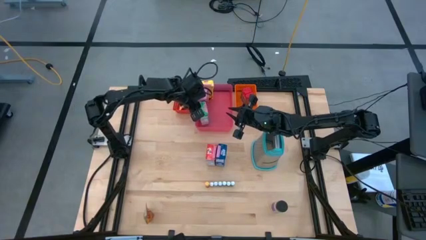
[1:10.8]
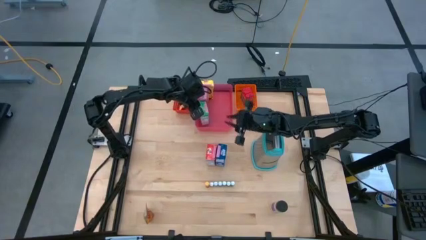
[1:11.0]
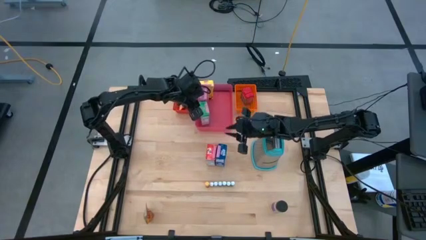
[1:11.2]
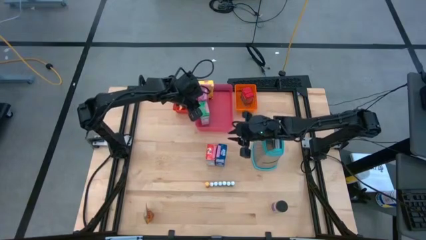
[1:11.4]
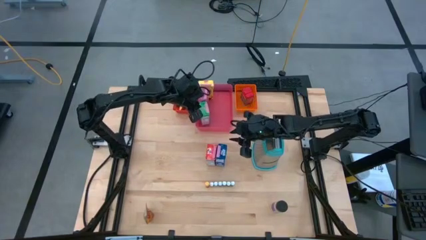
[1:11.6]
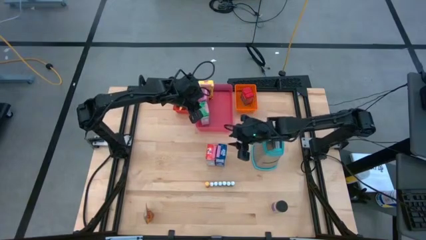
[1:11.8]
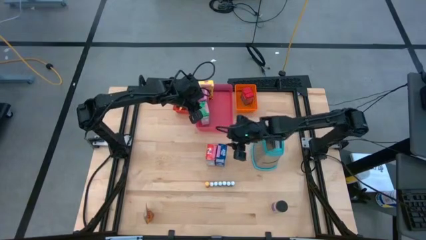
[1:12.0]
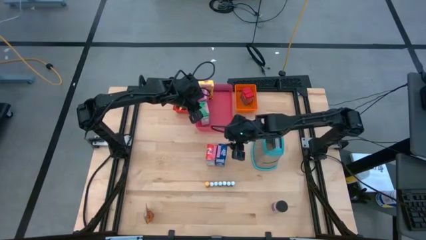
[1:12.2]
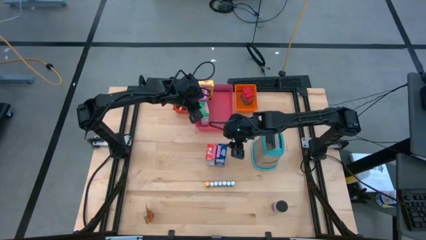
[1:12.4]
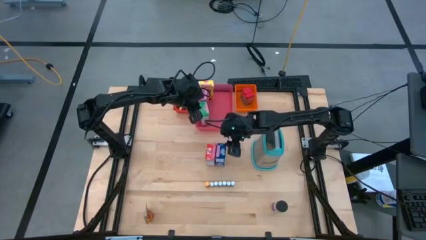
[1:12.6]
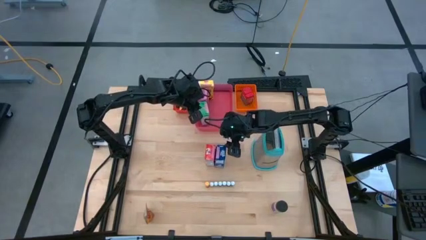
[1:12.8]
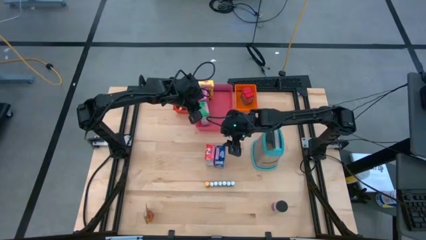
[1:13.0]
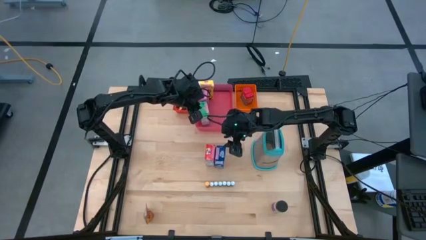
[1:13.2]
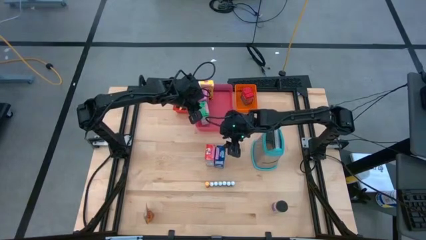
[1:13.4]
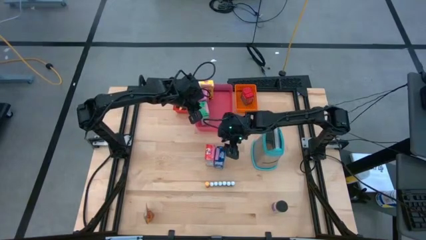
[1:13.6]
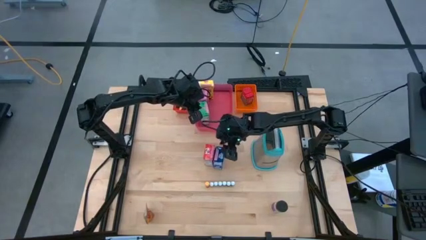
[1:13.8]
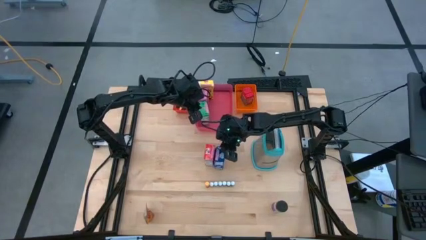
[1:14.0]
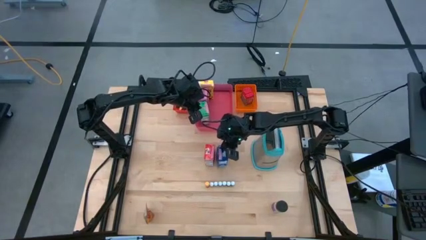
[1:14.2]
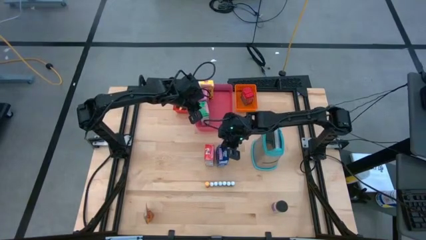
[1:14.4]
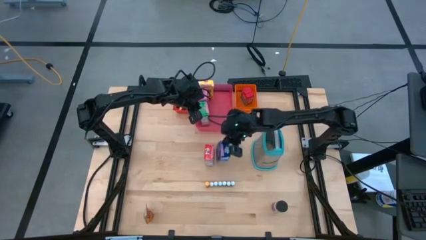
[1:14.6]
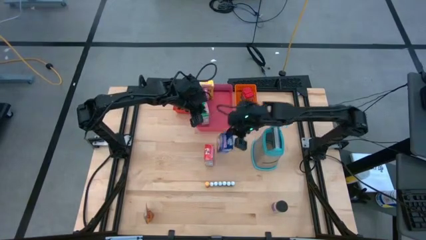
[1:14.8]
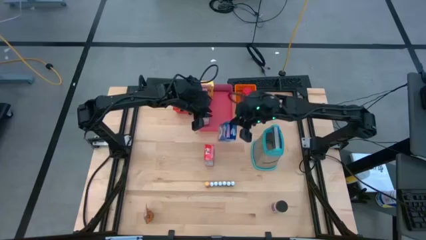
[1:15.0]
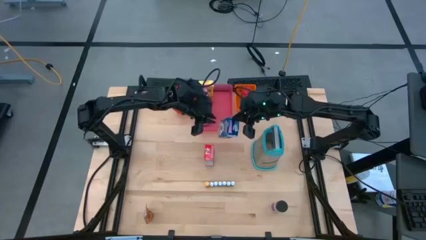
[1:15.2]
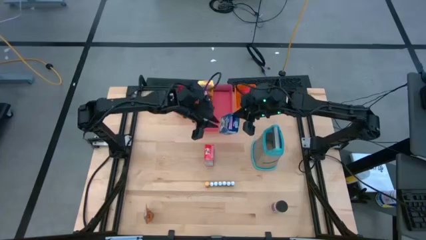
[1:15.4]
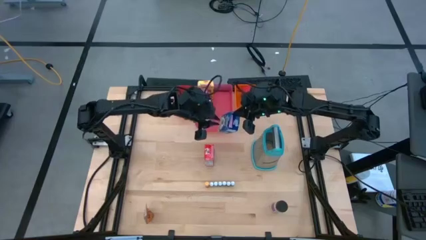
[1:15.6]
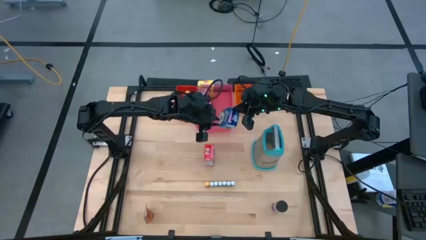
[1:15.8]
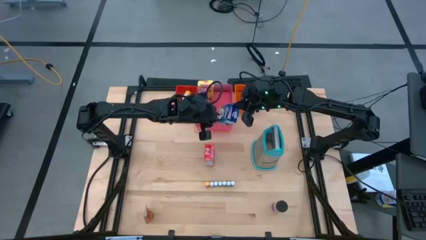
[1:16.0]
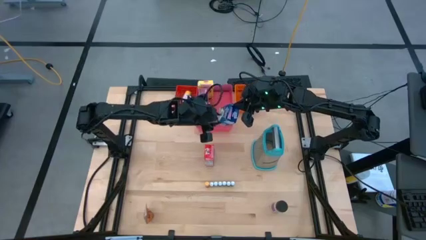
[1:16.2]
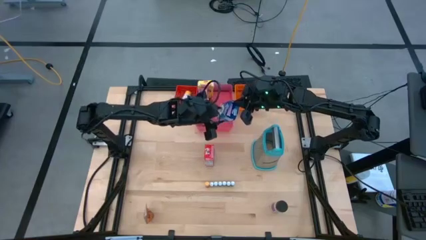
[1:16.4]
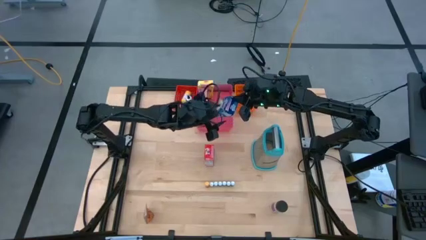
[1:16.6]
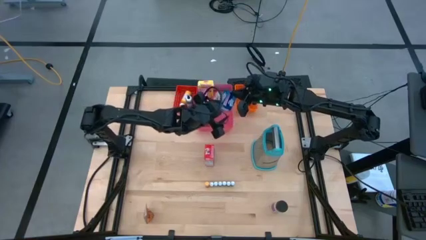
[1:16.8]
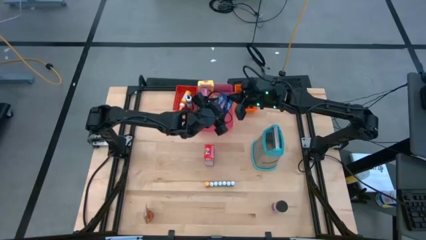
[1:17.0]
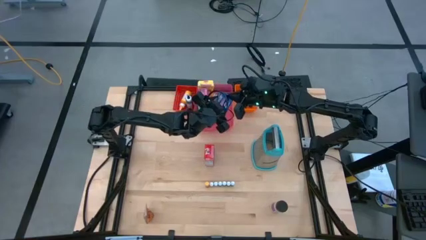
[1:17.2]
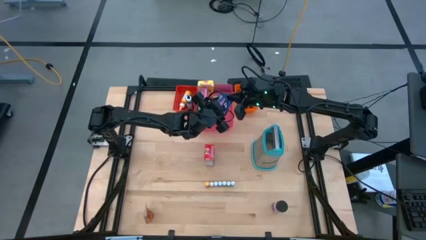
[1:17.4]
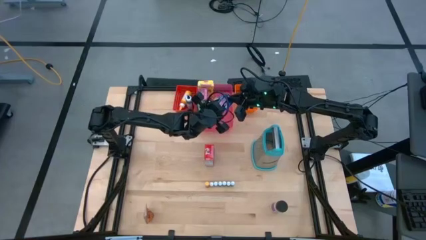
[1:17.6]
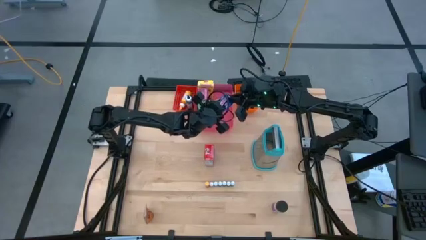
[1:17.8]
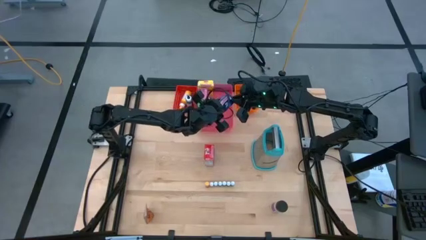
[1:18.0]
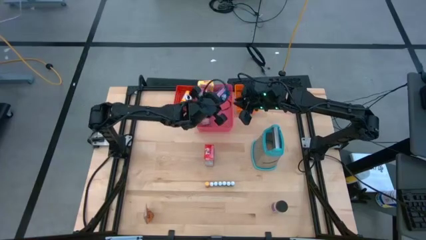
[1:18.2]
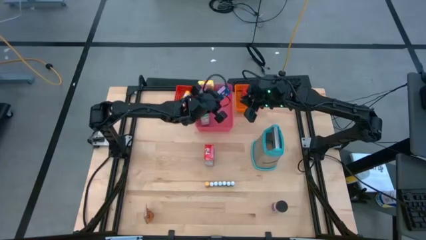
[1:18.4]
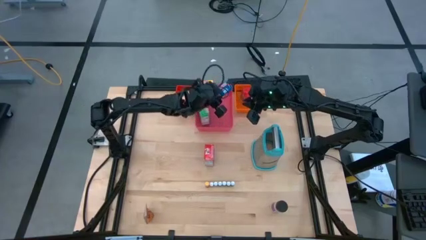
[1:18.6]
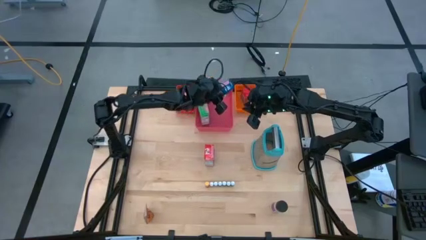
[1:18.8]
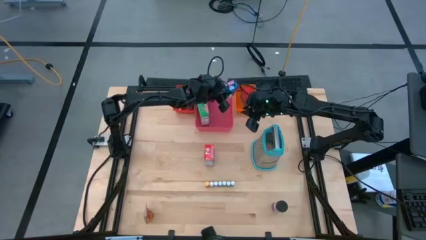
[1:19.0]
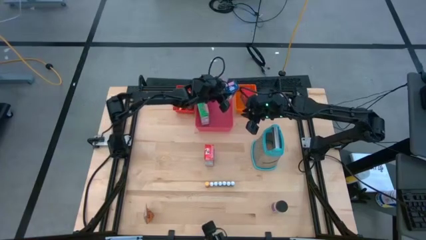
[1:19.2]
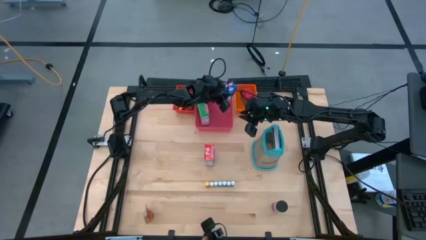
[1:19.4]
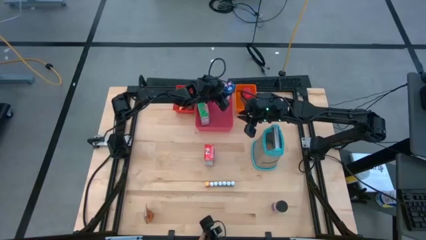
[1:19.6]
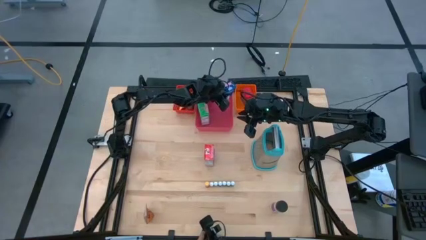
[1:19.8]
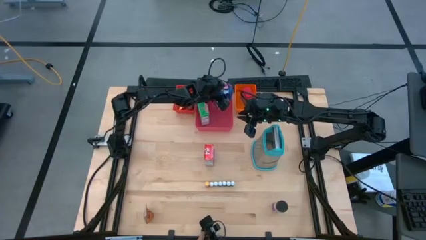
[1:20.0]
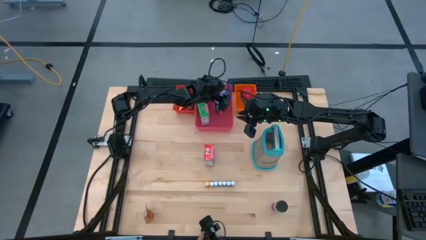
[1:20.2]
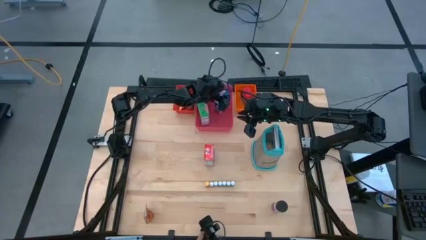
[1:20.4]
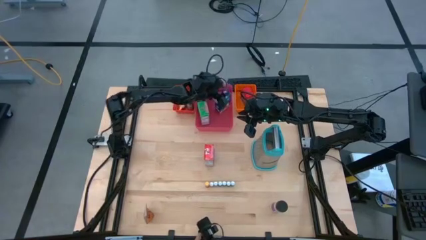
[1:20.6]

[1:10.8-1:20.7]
Task: Pick & Place Kitchen Items
Put the blue cereal box into the pink bin

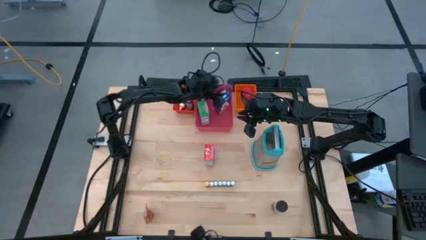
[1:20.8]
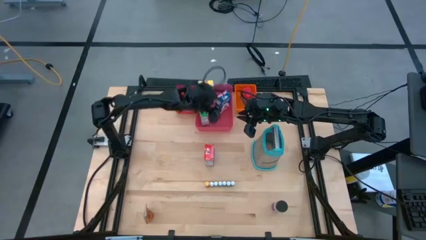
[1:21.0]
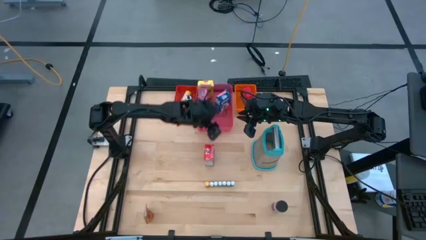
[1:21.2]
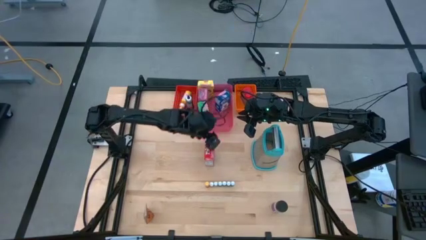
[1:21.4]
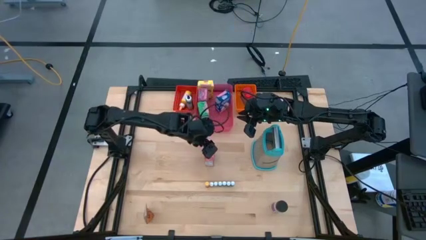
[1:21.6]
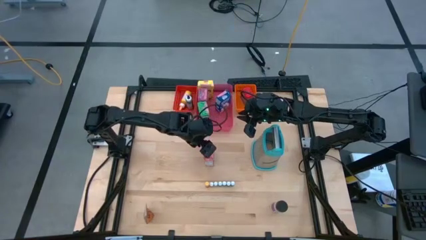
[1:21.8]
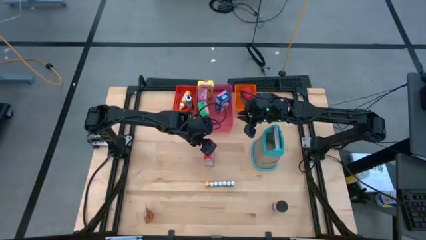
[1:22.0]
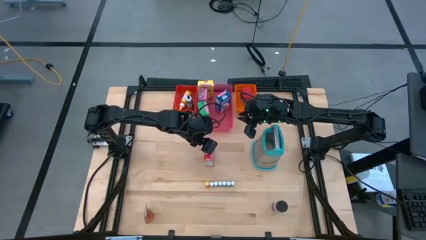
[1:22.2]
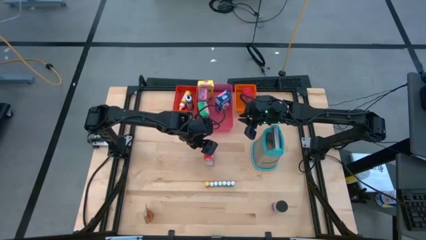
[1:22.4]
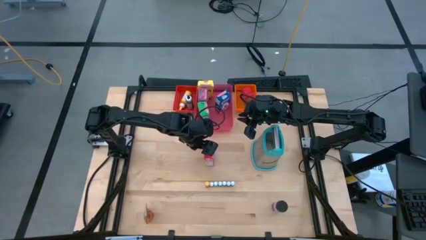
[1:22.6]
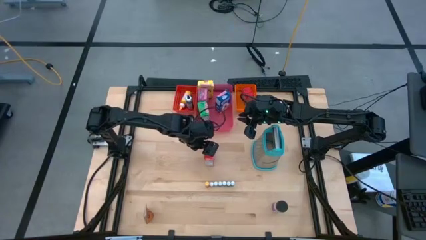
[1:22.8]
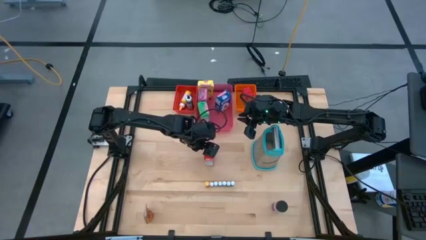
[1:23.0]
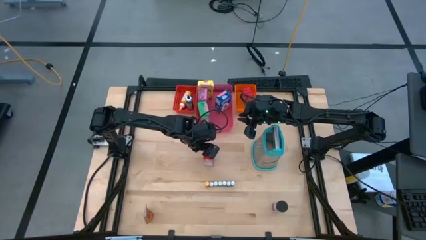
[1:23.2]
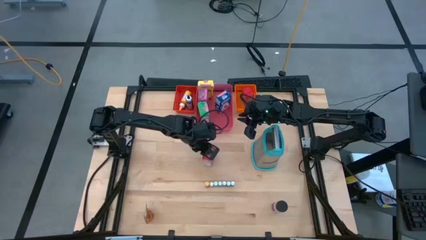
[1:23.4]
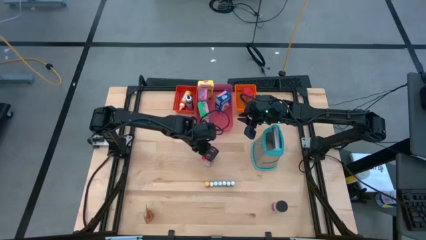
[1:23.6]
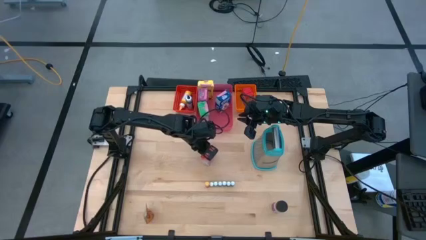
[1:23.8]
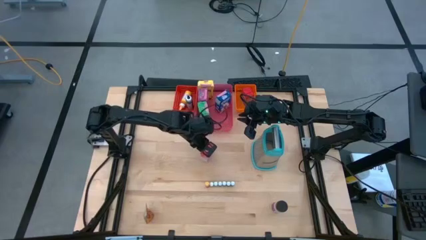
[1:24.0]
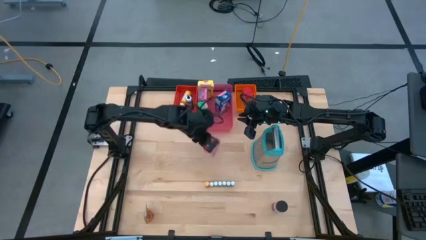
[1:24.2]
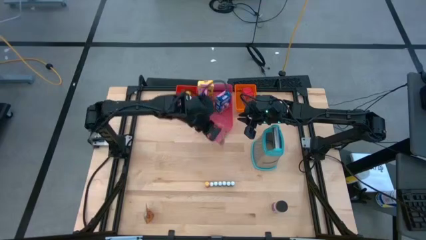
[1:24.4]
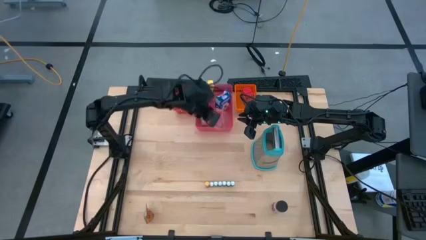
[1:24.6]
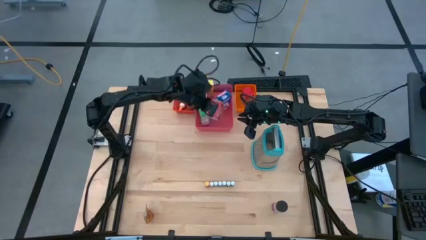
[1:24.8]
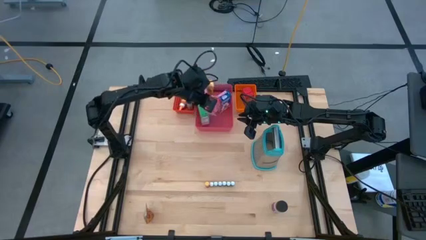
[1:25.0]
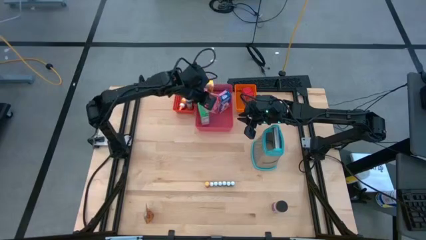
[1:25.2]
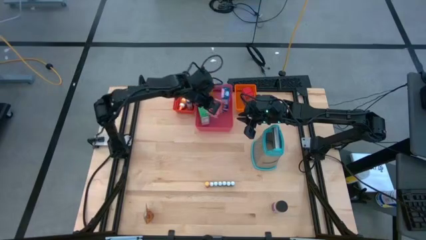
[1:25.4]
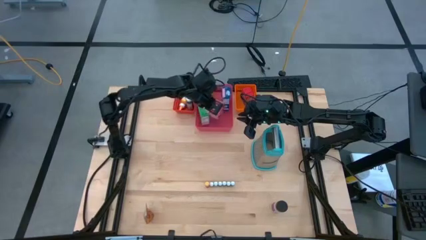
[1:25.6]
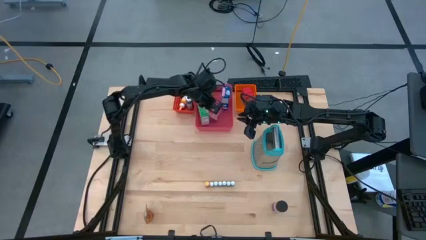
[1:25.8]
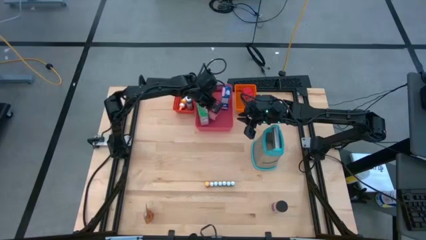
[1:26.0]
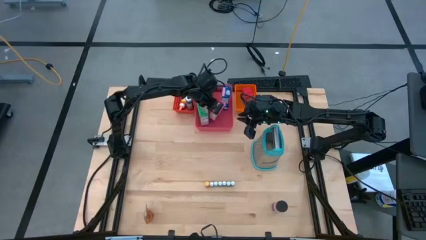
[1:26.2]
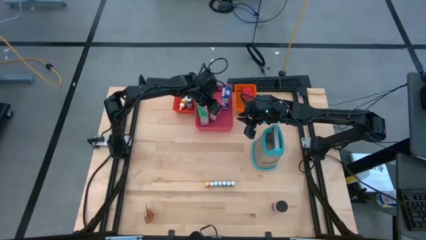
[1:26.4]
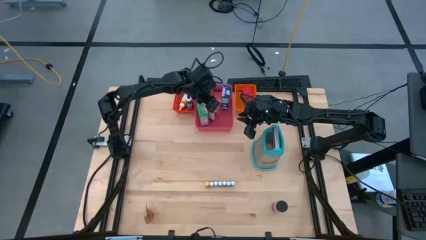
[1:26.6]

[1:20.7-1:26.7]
Put the red cereal box into the pink bin
